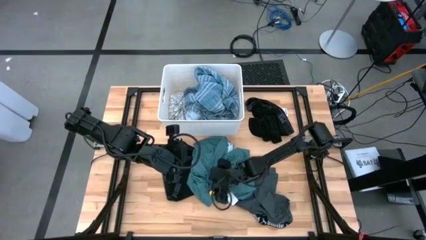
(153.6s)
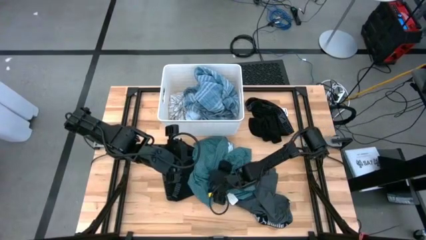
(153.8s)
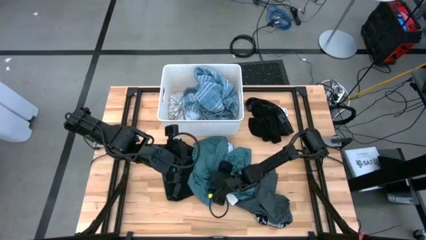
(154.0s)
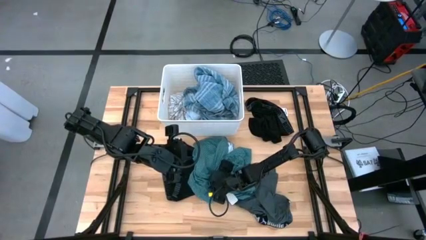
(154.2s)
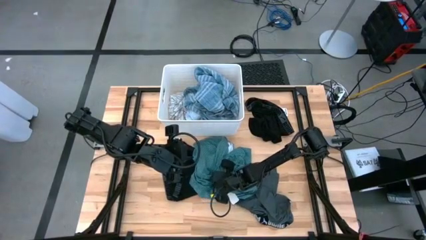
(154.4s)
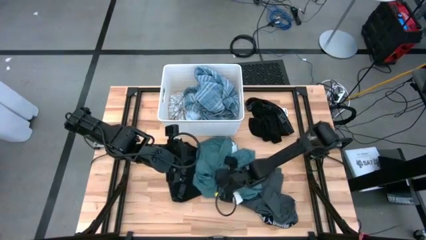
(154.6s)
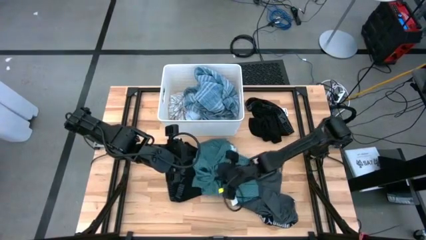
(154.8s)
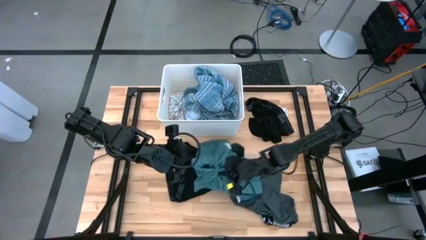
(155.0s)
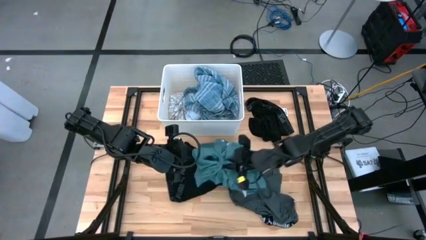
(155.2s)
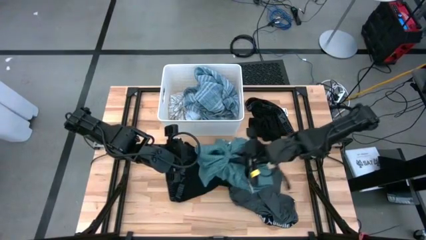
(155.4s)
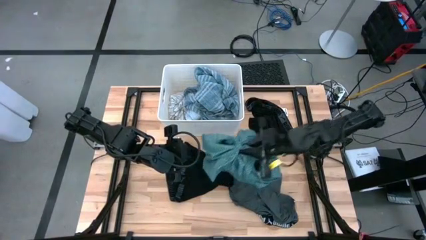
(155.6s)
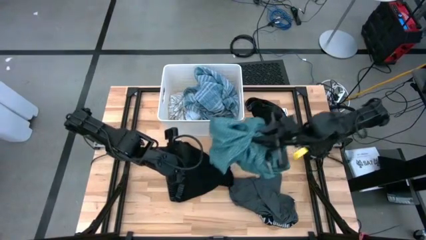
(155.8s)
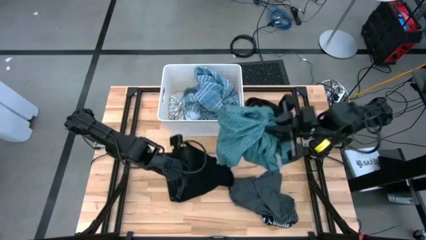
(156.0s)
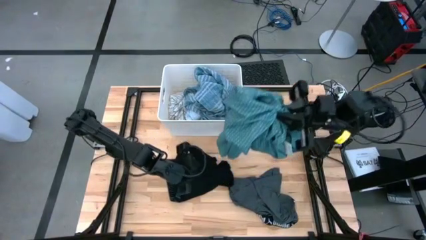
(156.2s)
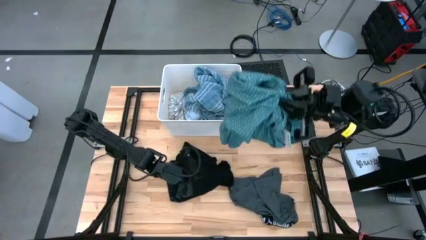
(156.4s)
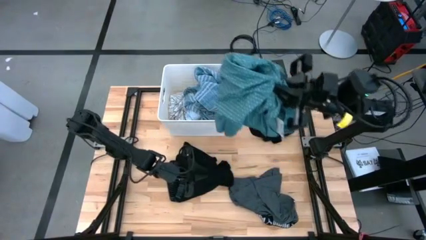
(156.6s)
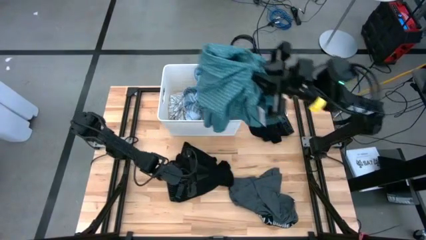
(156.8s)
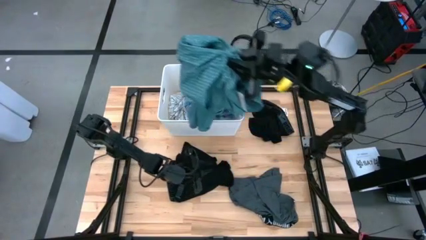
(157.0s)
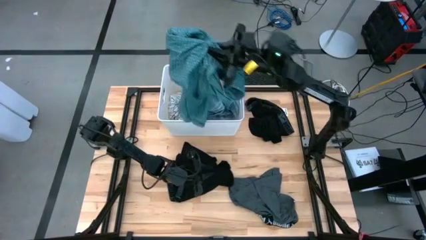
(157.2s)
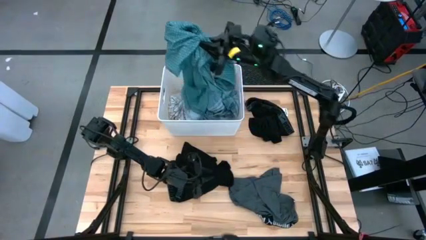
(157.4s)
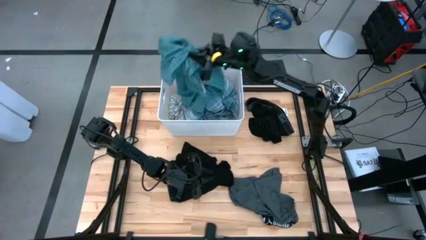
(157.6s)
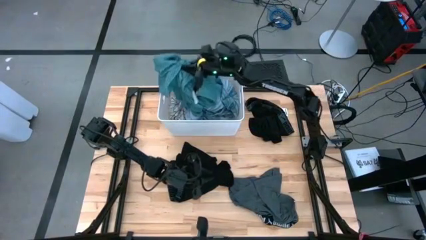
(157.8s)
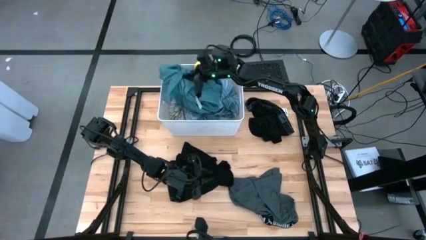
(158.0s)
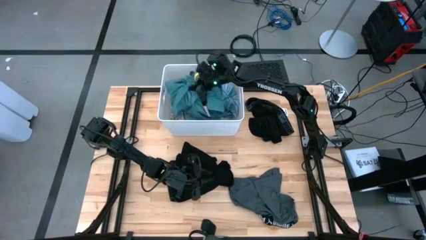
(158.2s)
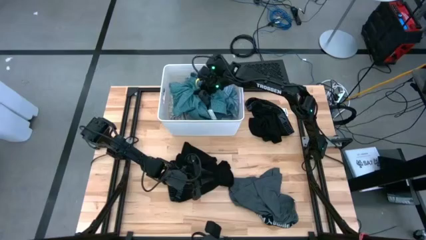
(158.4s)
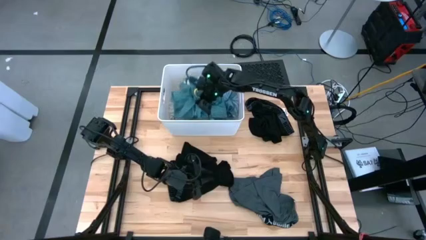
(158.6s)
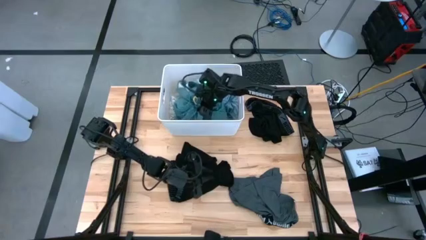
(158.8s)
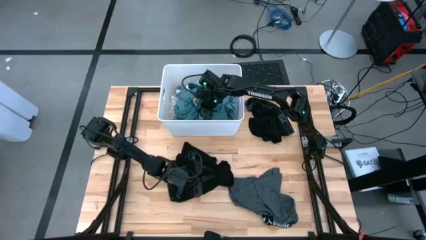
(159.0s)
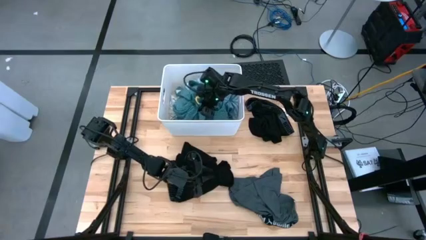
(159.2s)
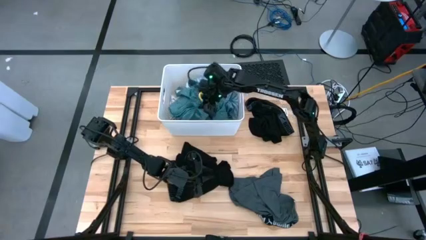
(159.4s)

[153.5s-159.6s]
Task: Sort clothes
Put the green shirt into the white bin

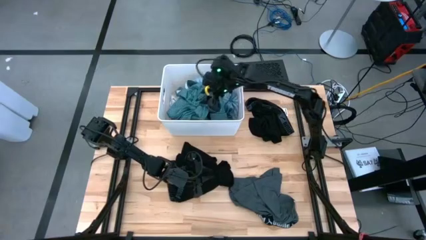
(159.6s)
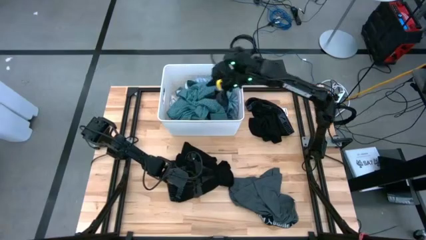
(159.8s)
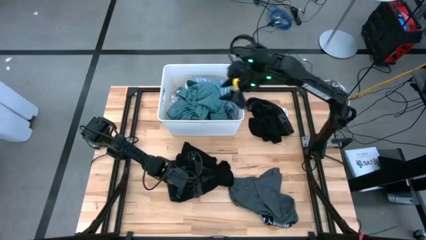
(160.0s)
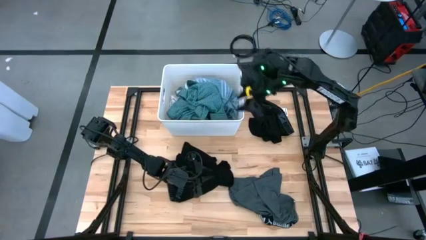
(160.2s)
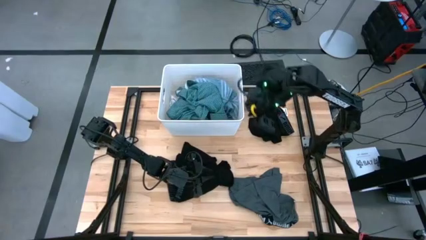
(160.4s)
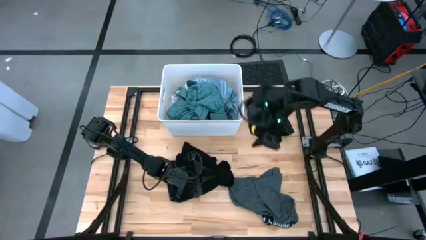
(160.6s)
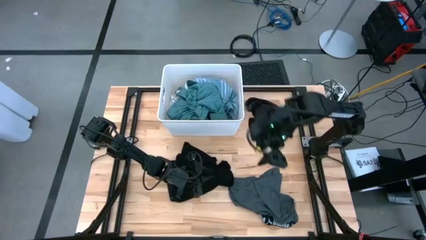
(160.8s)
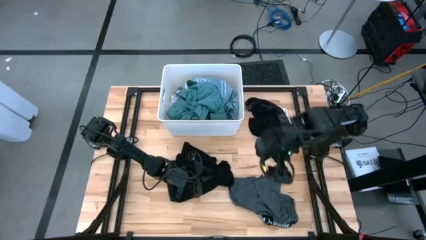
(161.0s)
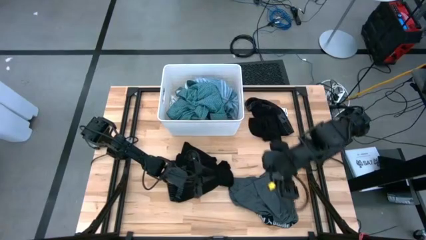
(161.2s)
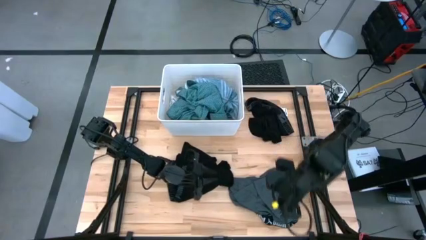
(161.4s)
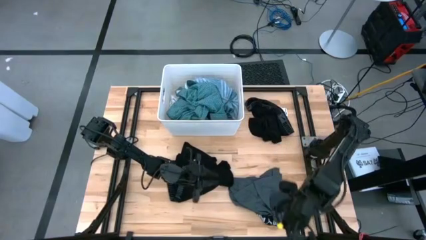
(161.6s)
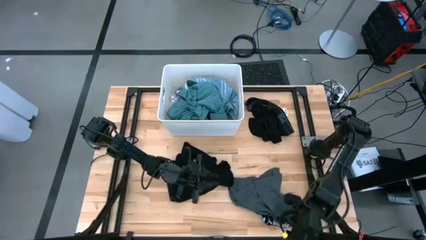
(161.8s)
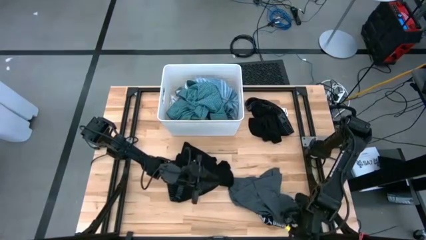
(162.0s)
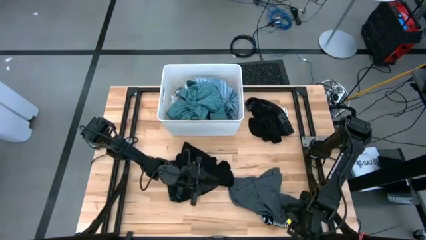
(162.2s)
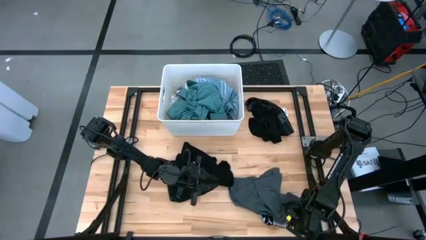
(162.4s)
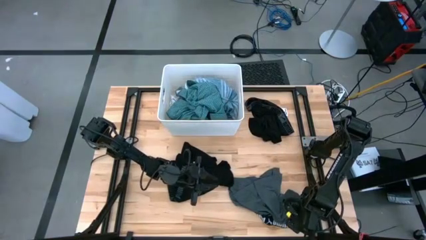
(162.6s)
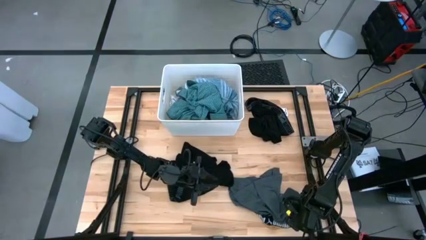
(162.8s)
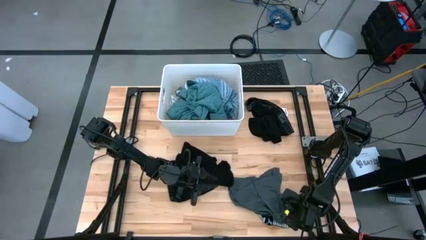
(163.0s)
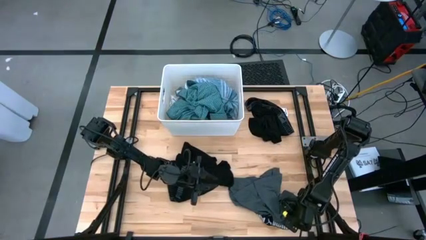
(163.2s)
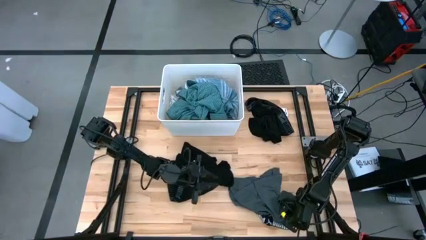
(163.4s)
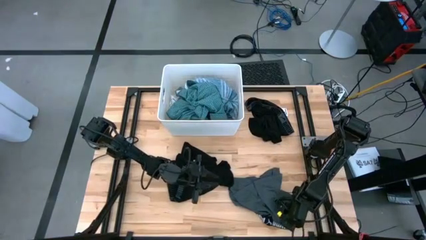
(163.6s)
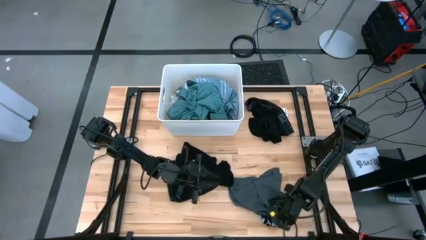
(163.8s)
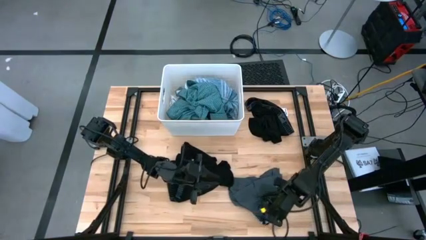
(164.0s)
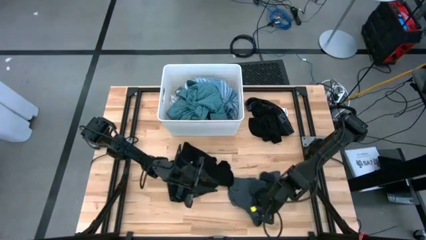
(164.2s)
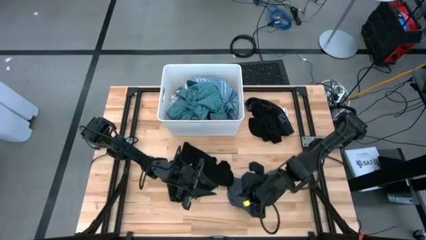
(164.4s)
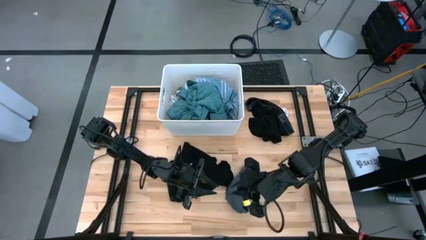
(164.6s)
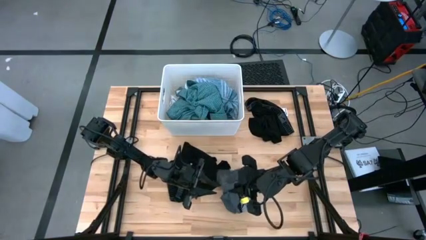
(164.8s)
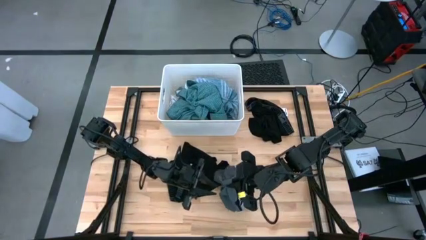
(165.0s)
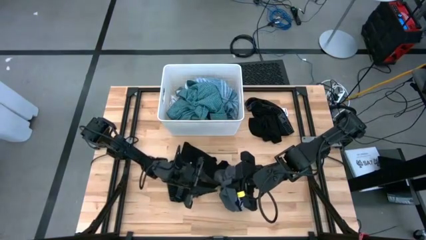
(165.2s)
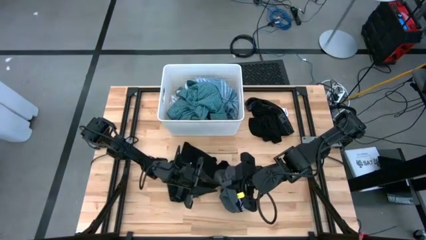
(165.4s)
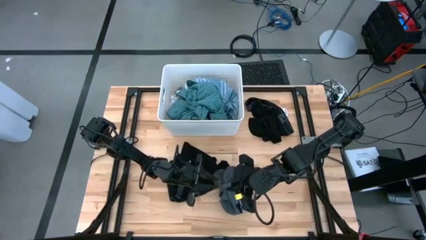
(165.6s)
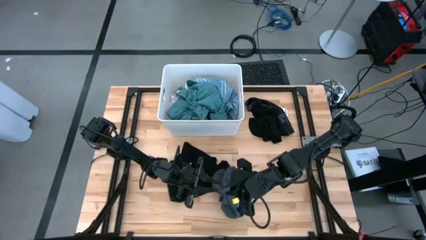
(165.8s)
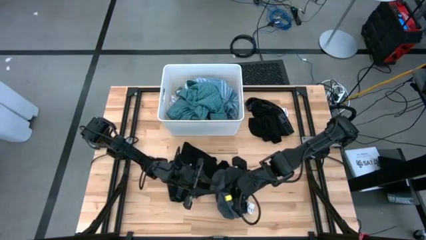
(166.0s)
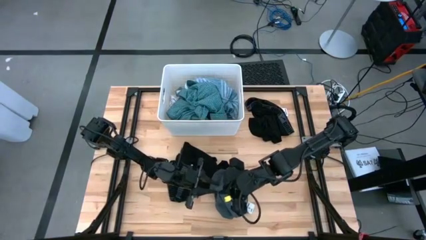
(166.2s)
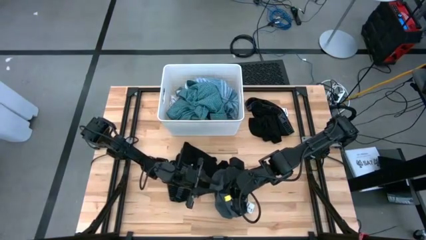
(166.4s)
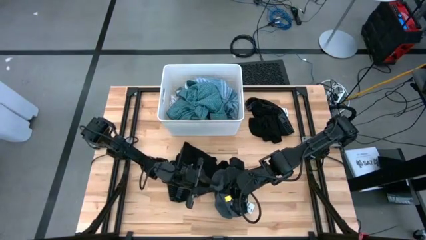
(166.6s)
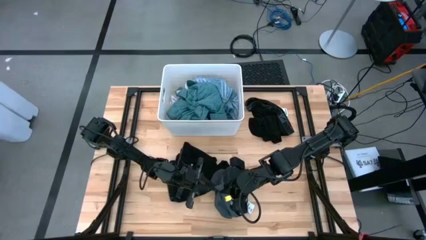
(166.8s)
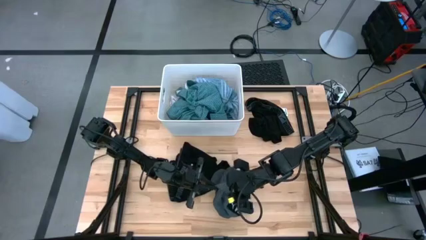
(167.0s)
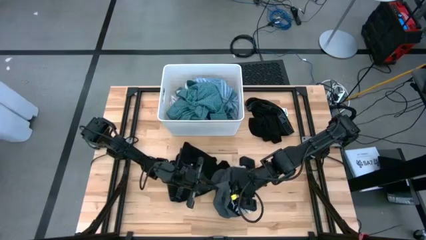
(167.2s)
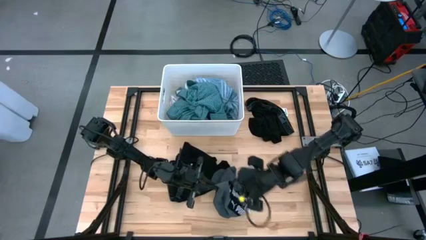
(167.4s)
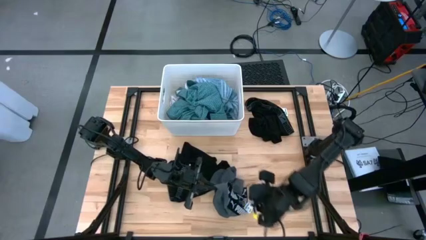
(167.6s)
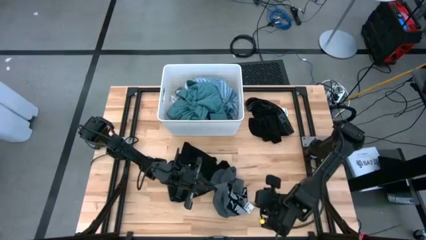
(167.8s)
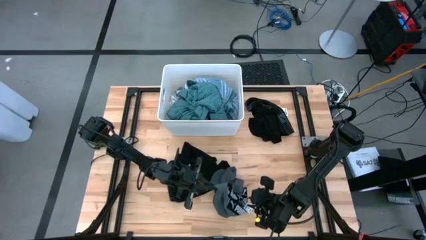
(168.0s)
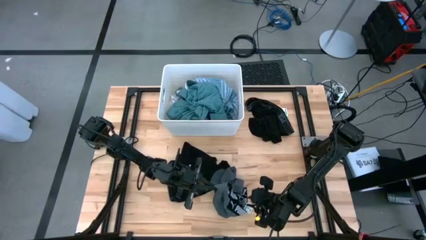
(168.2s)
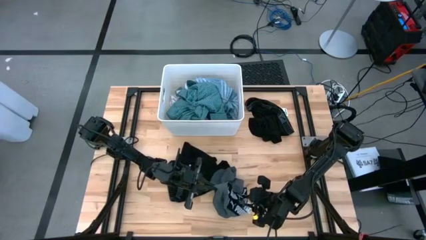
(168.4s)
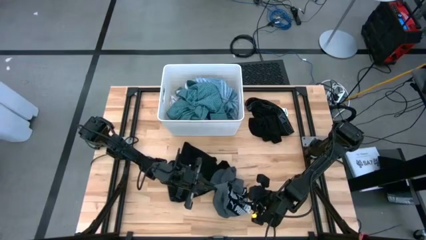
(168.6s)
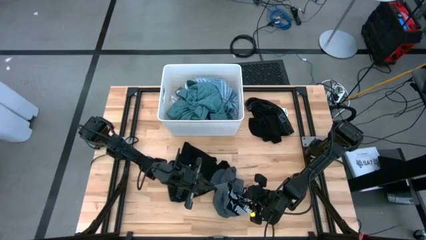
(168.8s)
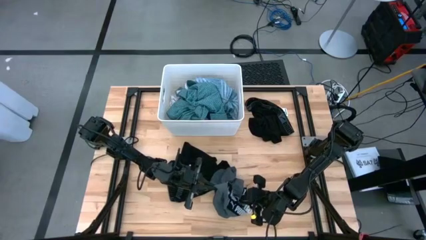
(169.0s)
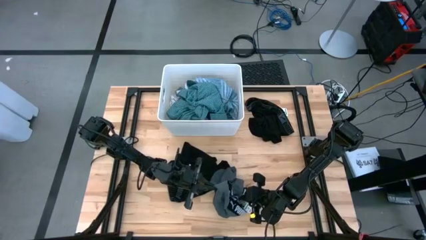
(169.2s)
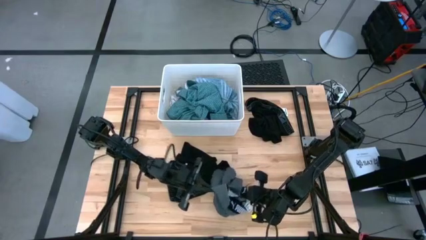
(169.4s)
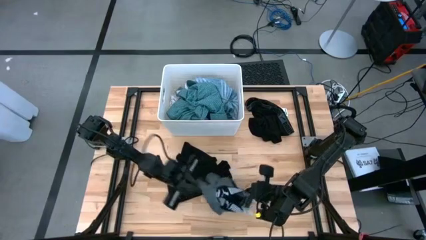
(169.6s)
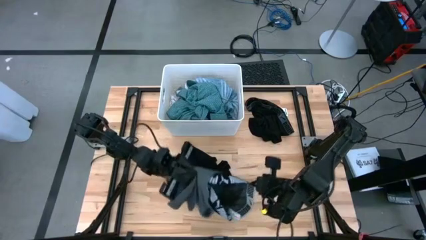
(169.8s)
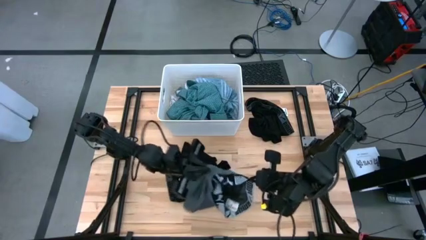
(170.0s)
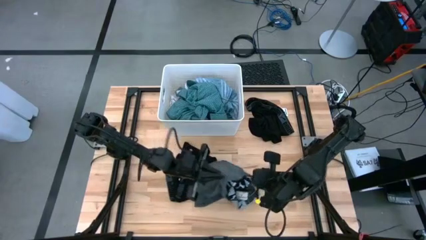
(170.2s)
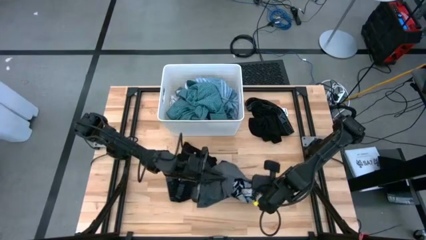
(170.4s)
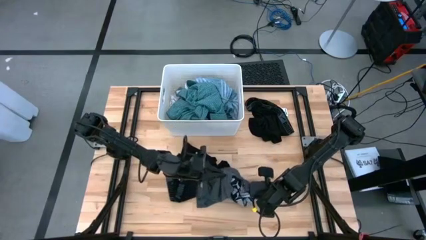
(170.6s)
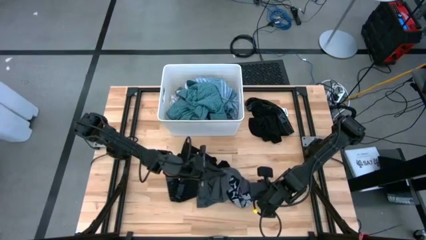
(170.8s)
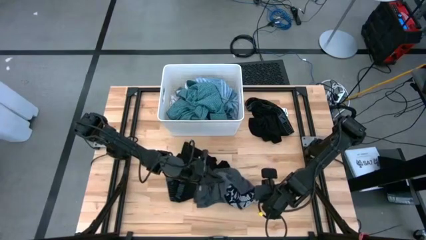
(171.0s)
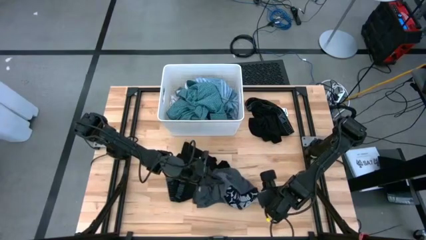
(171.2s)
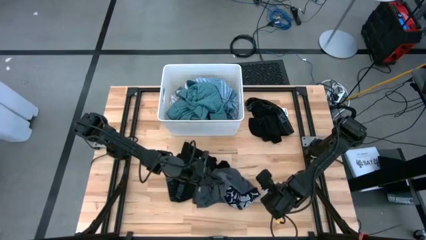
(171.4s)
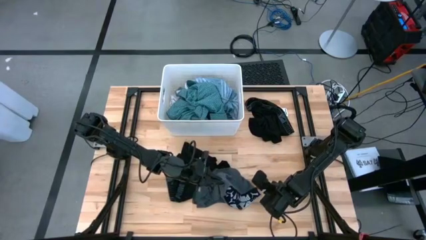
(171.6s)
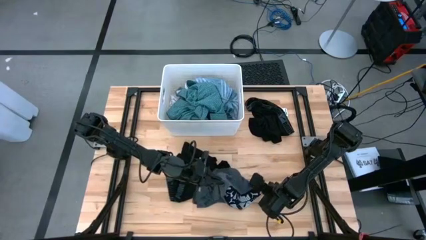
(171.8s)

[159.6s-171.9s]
Put the gray underwear into the white bin
